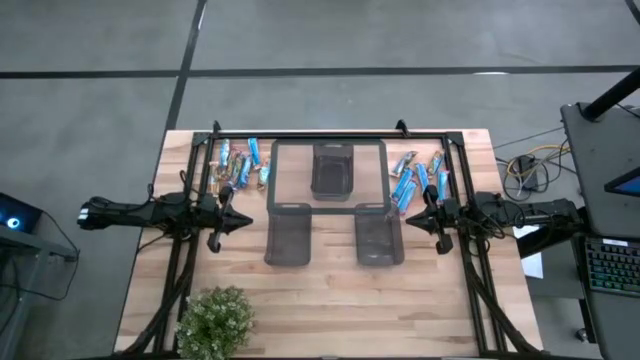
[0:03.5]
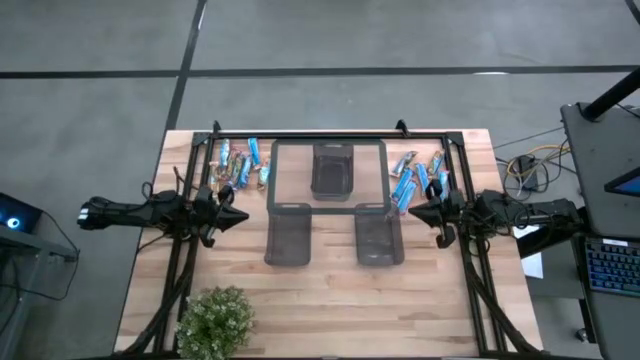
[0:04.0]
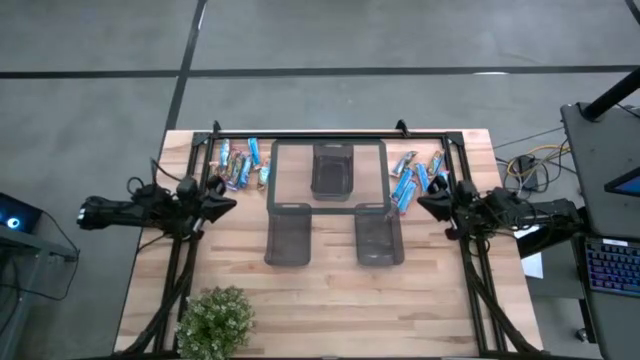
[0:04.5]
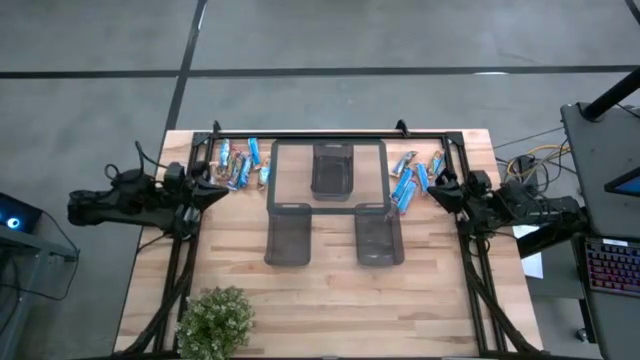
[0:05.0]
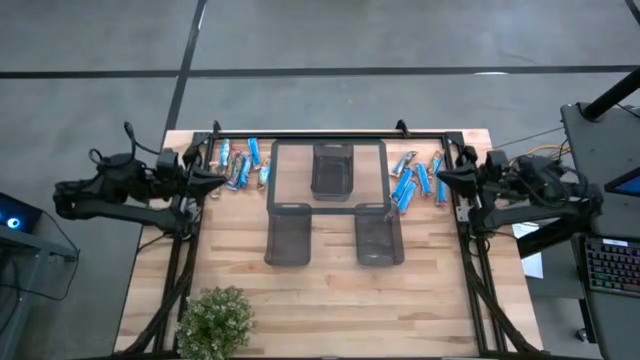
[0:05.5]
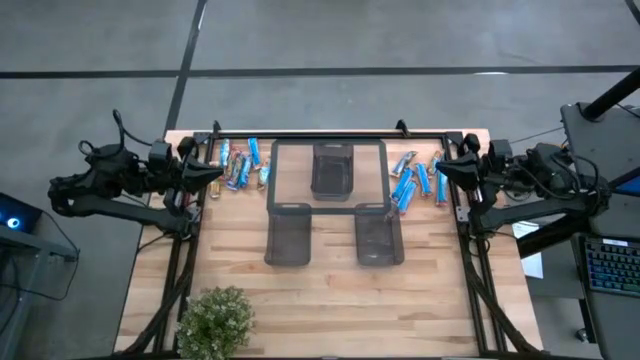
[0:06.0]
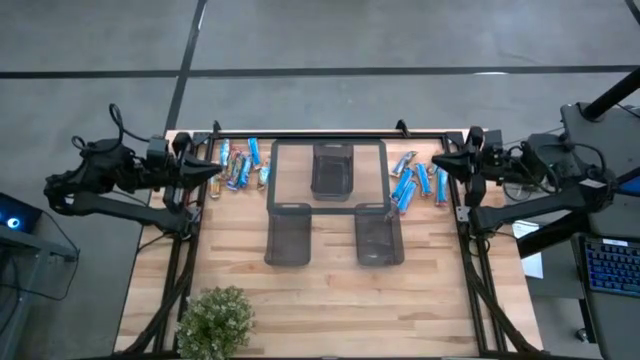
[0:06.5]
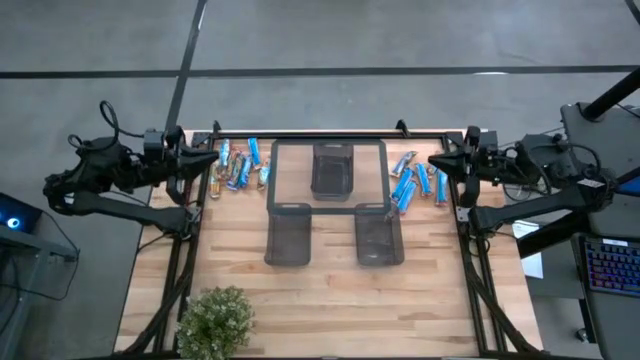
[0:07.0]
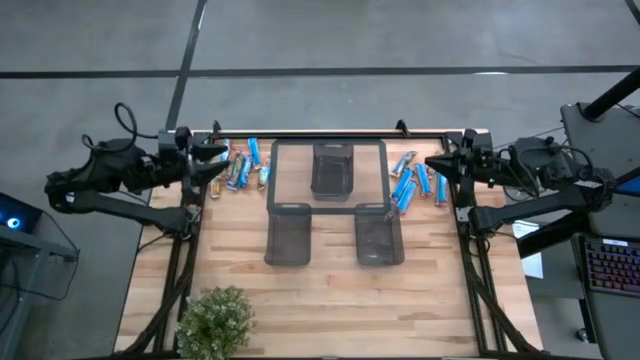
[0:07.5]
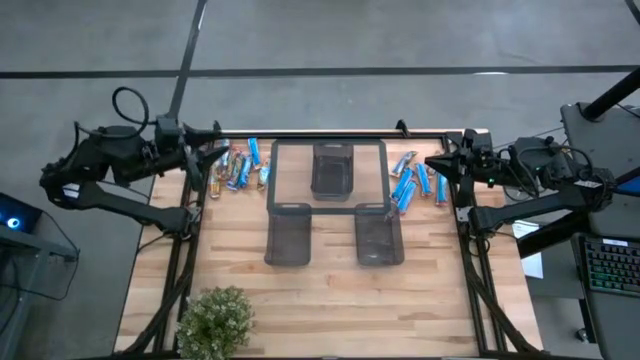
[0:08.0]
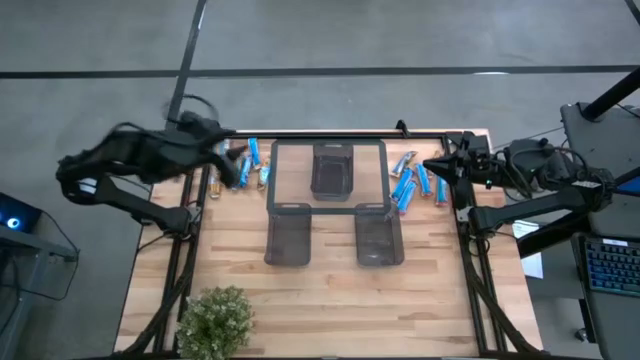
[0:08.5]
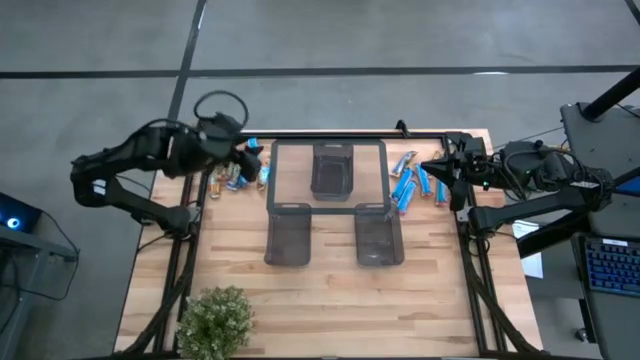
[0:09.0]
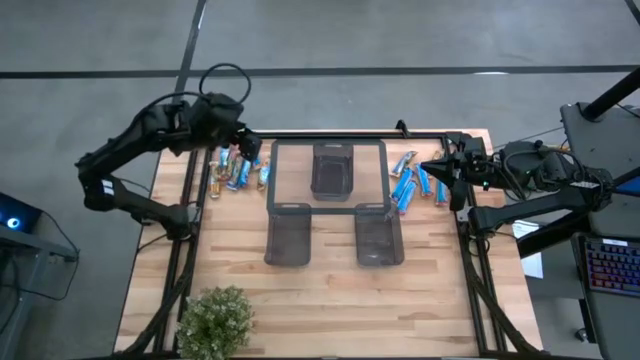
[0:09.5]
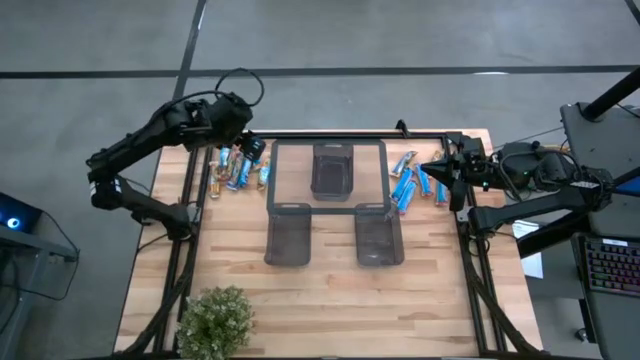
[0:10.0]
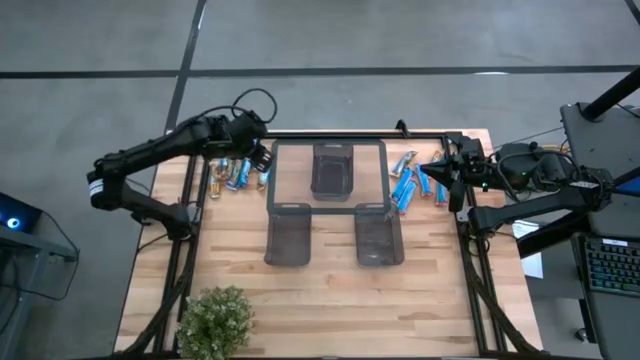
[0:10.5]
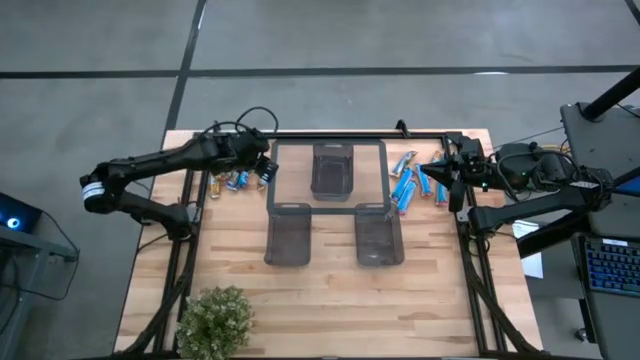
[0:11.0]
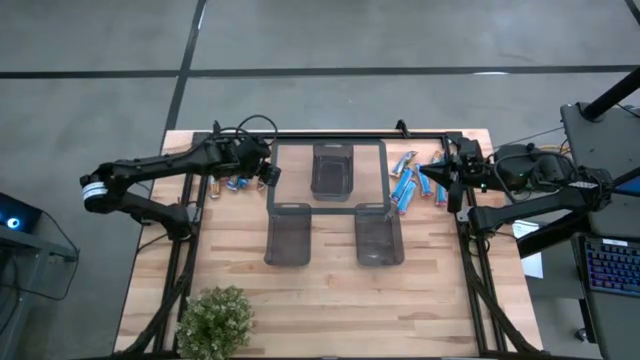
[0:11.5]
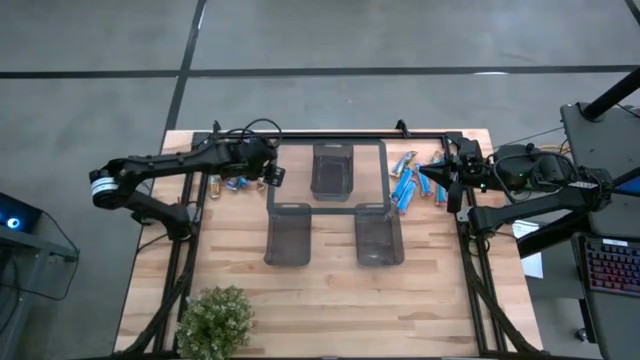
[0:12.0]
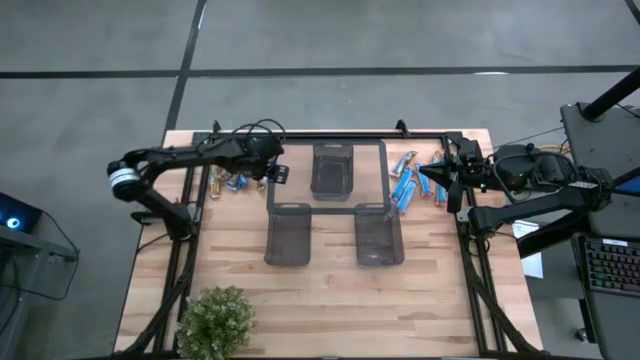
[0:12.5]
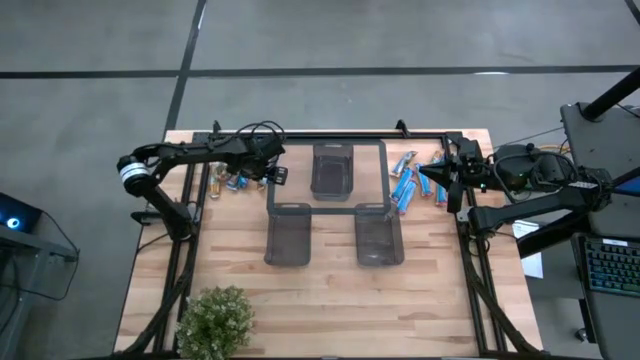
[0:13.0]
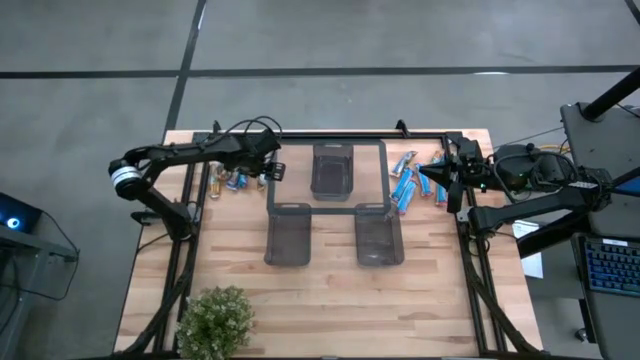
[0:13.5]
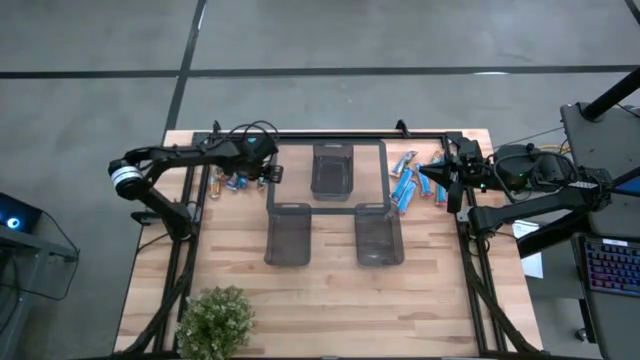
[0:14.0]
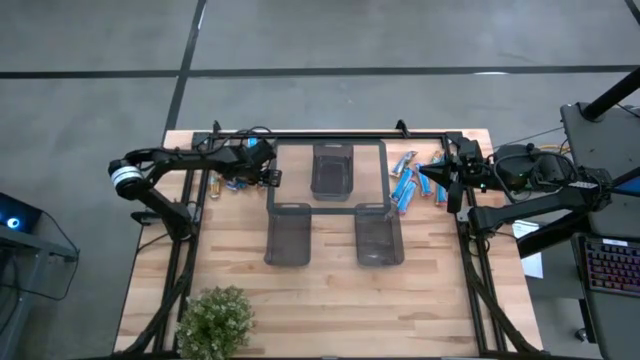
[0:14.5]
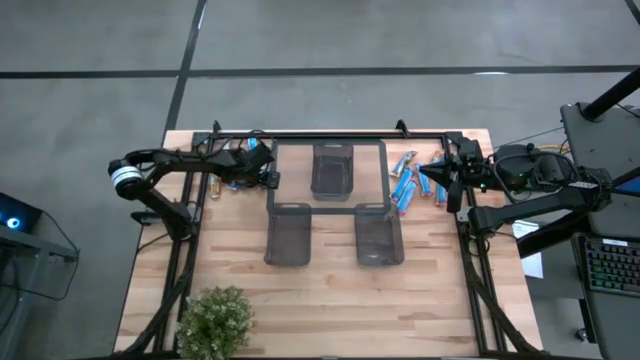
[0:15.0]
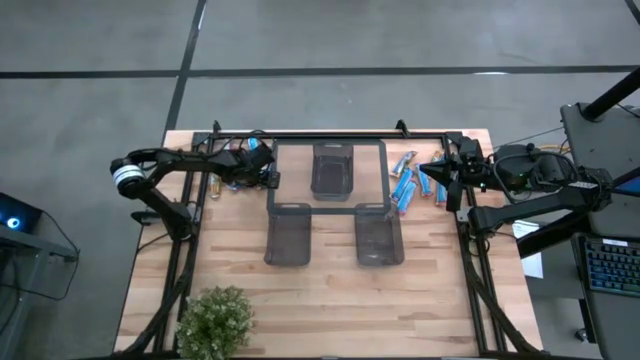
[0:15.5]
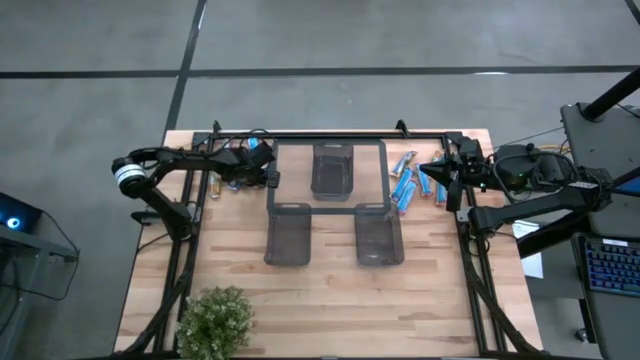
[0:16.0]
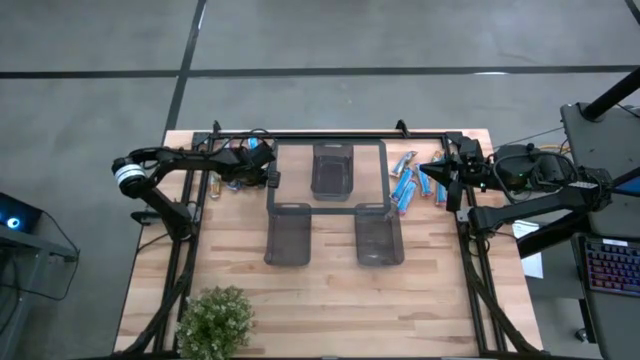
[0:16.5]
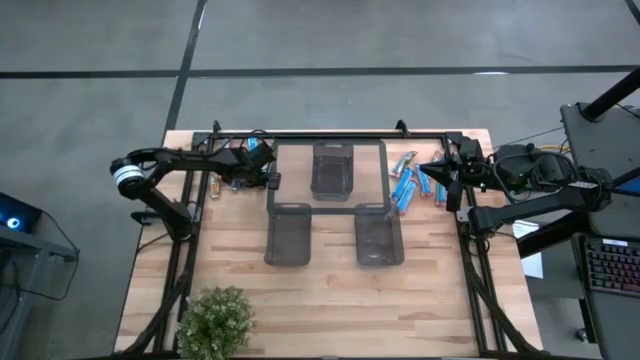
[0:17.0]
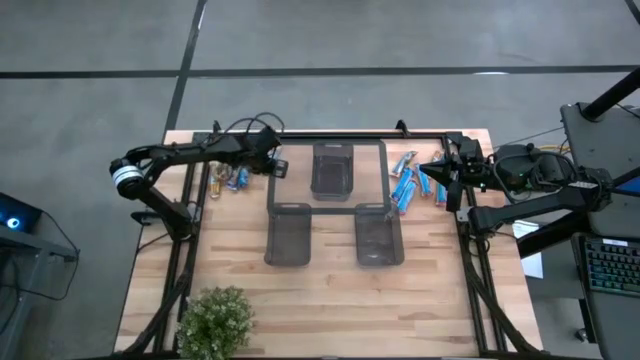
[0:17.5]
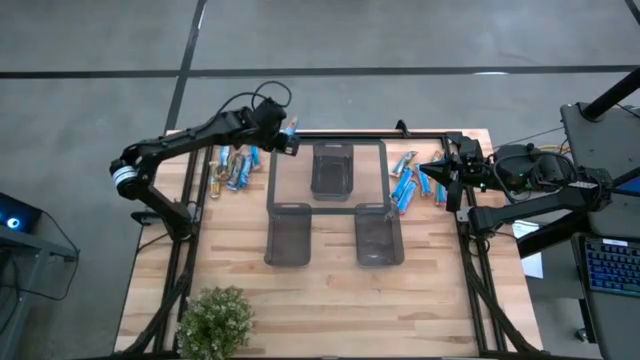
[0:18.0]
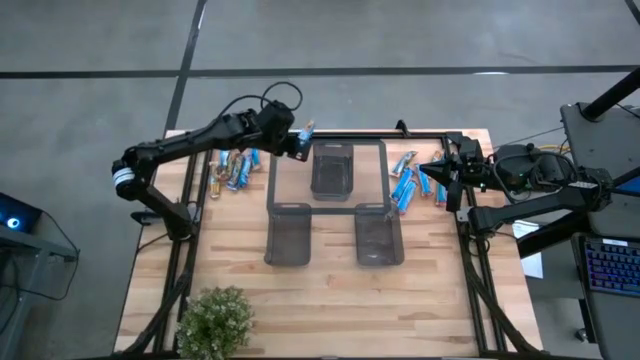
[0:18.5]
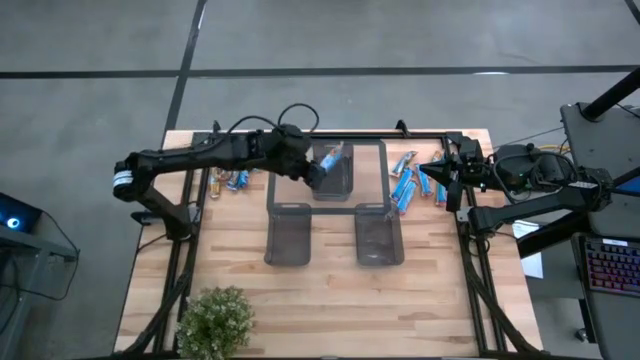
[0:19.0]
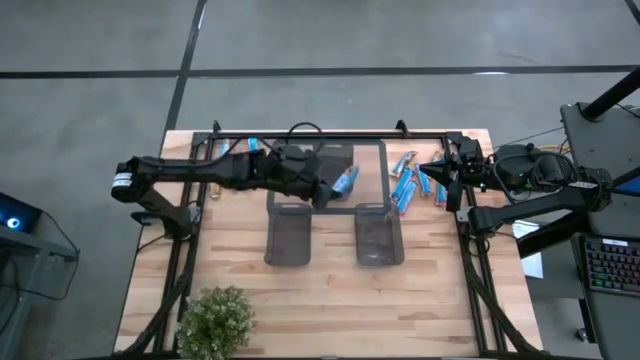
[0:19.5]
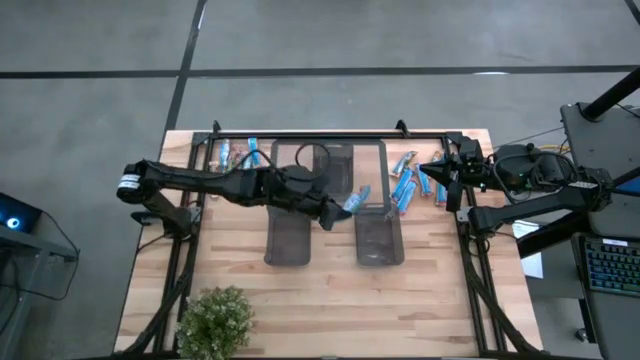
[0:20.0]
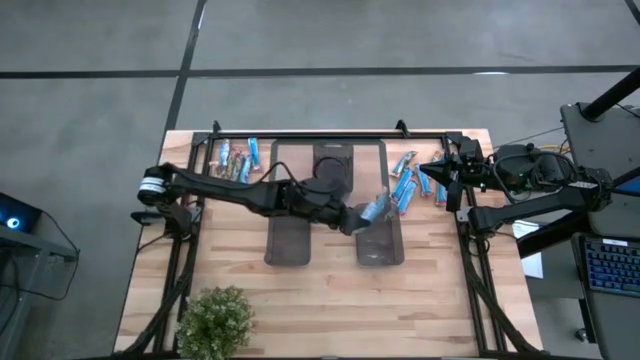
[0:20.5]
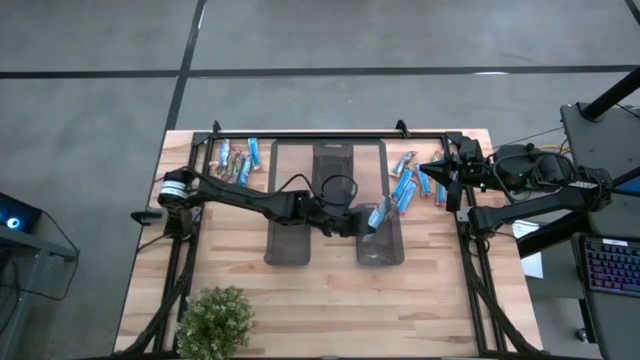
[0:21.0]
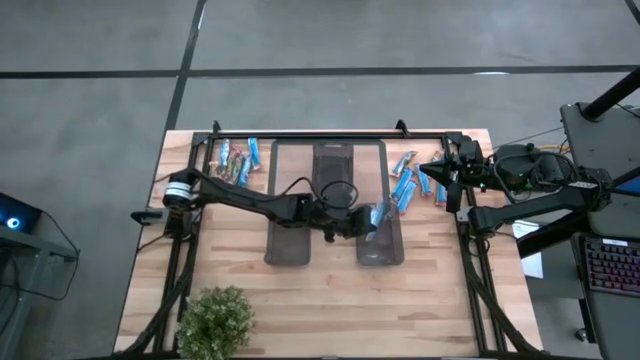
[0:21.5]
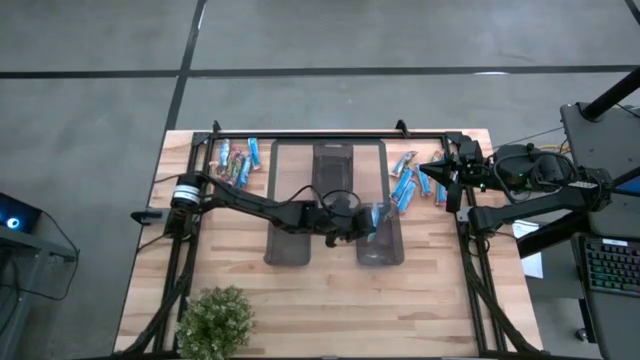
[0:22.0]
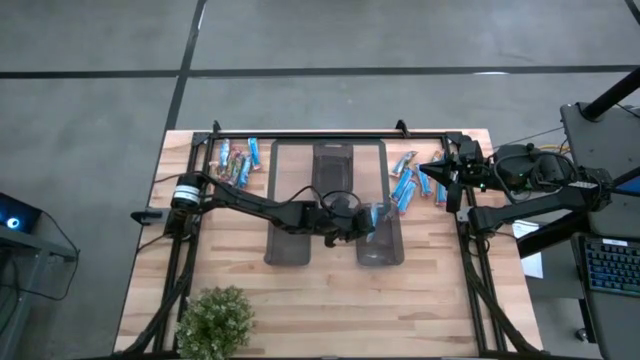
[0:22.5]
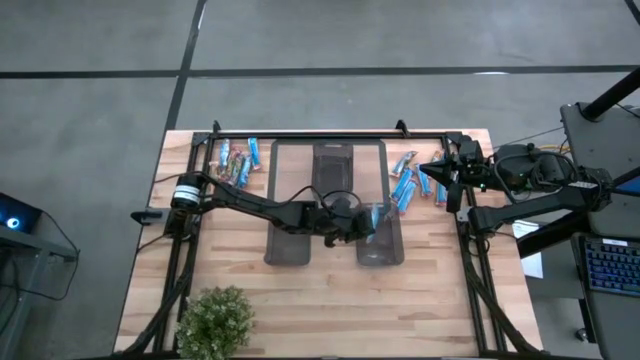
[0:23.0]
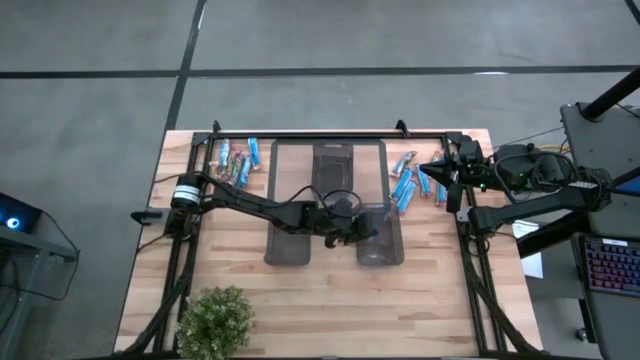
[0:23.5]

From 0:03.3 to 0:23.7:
Task: Pick and place Granola Bars by type
Put the orange granola bar into the bottom right black bin
